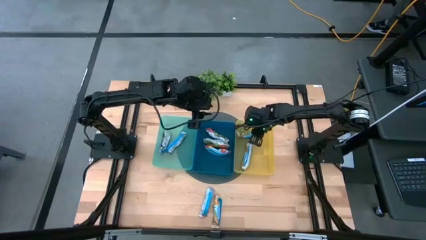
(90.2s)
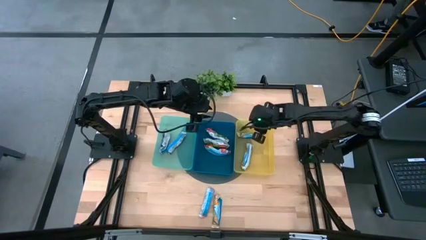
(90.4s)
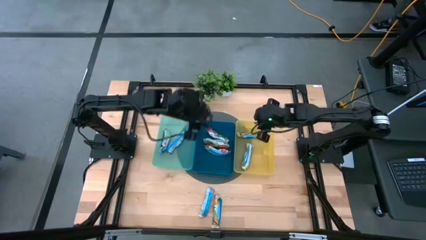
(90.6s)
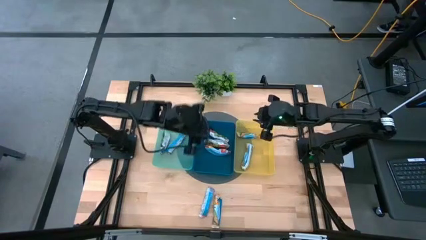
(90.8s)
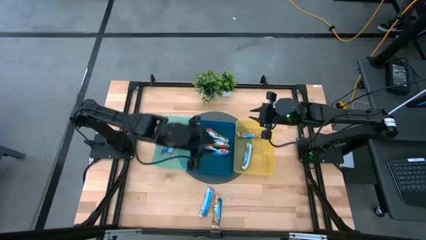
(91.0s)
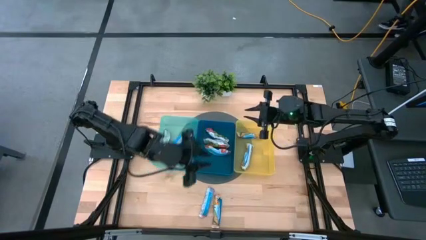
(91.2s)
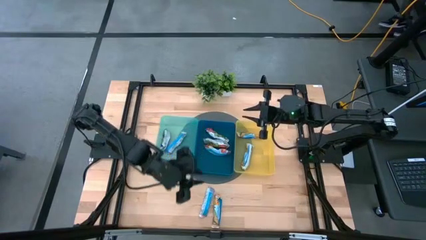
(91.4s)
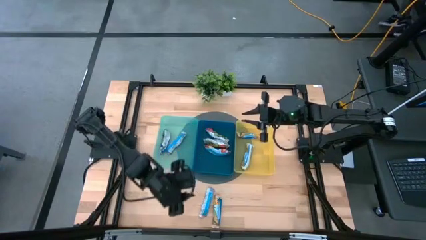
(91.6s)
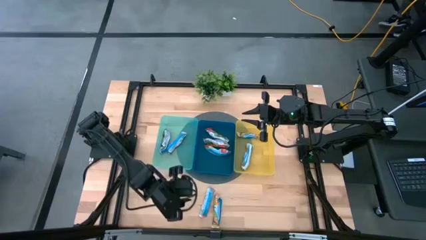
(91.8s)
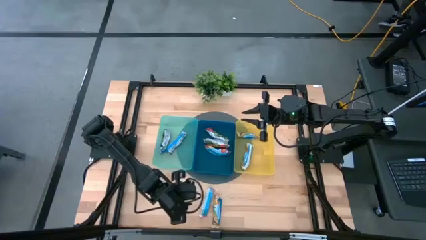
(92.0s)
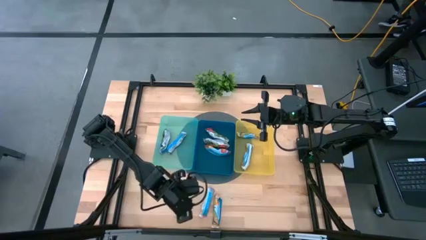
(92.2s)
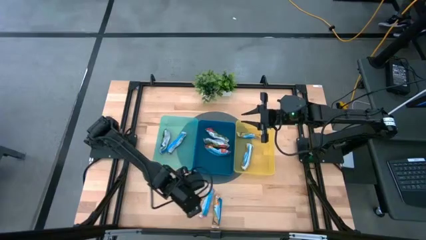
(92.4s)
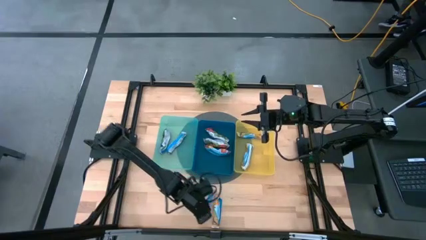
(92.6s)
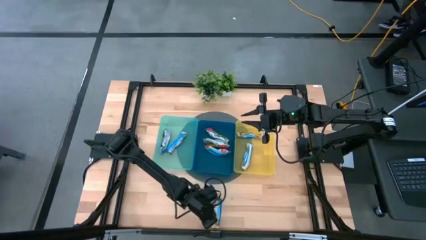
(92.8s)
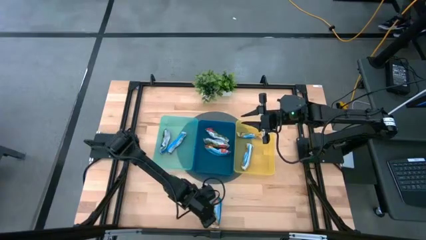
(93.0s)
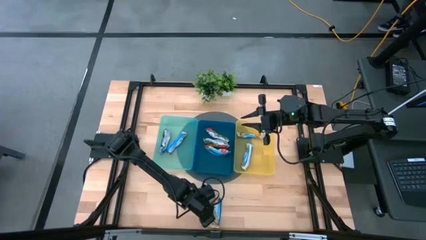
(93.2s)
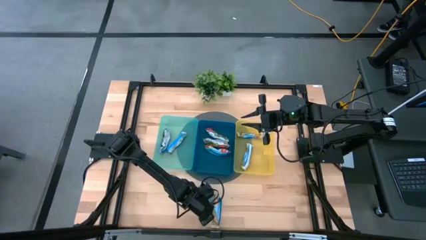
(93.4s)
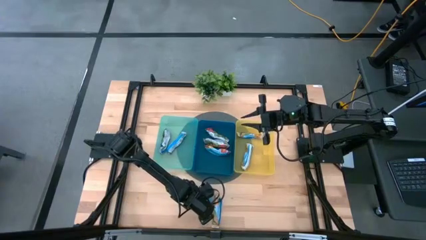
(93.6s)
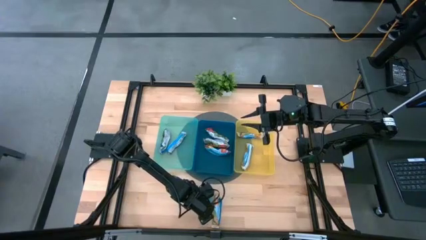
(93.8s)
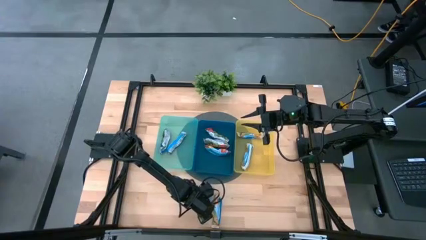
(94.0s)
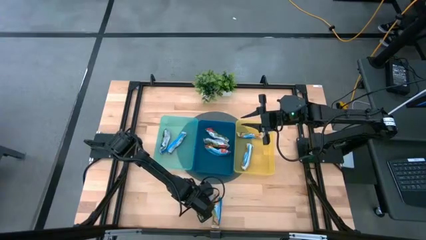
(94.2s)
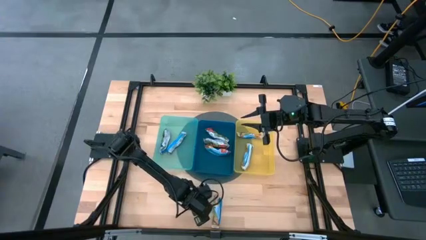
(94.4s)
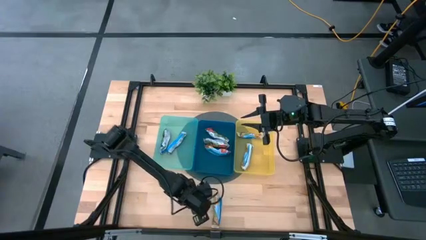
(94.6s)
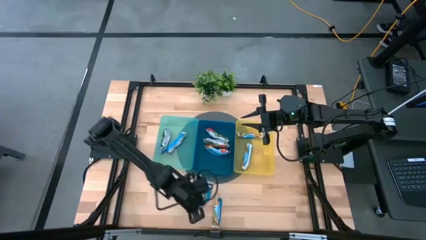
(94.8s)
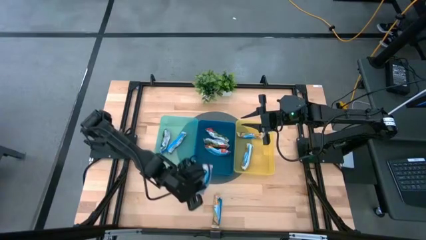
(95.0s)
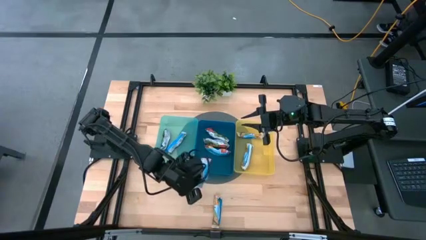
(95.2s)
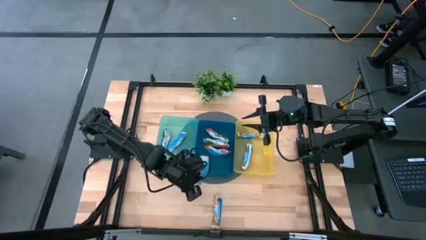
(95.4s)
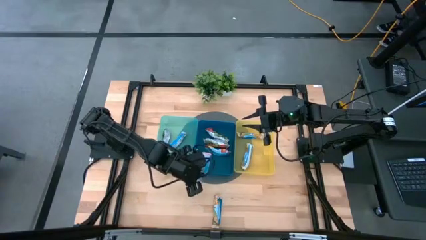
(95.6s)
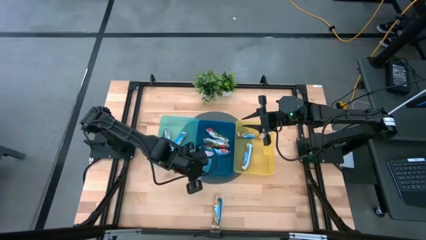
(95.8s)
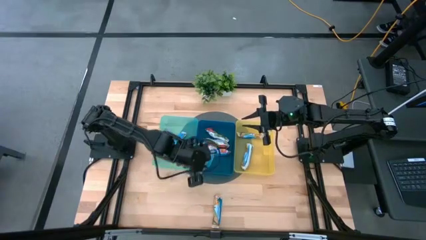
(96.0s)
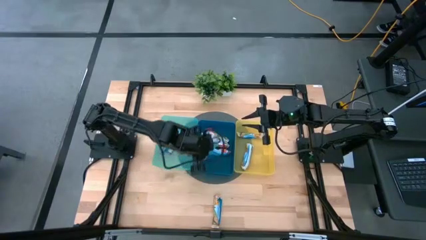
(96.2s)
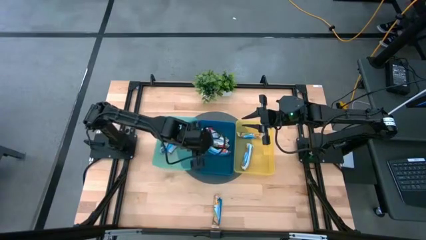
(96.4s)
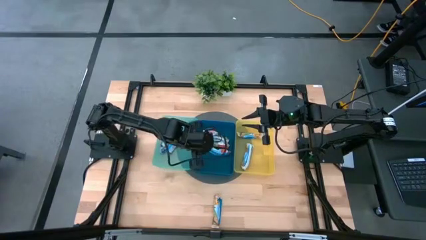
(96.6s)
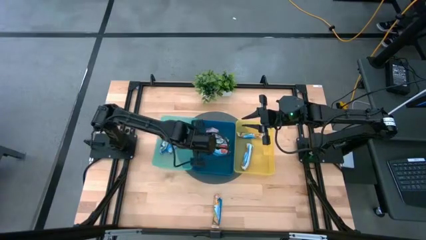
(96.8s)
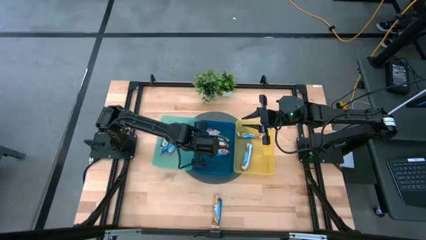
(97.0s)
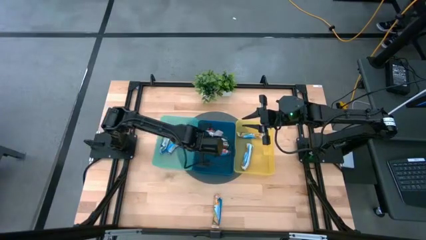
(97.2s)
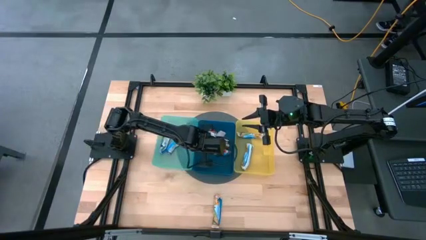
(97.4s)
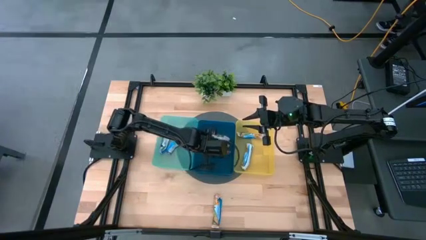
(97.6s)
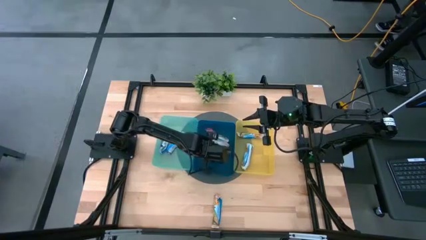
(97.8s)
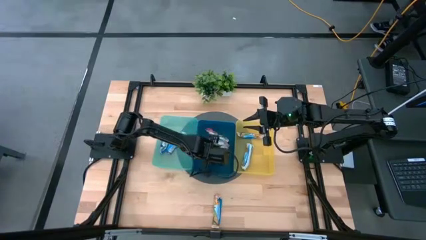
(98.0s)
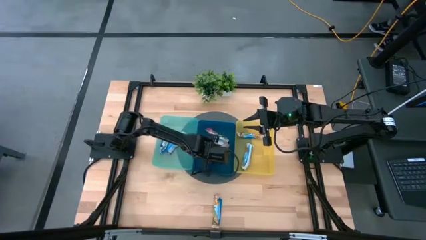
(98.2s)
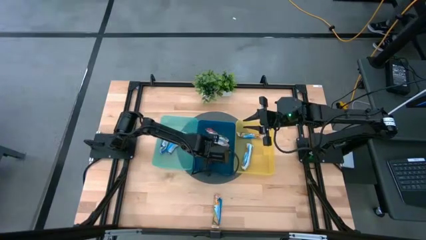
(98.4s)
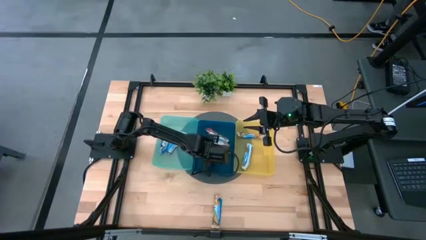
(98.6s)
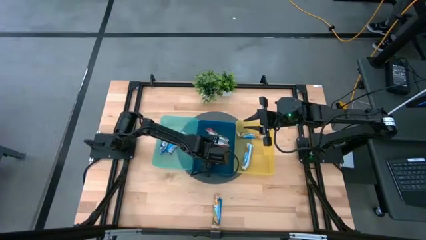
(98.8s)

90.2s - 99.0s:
Task: Pick and place Granola Bars by type
Put the red granola bar into the blue bin

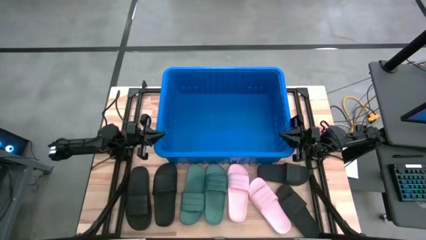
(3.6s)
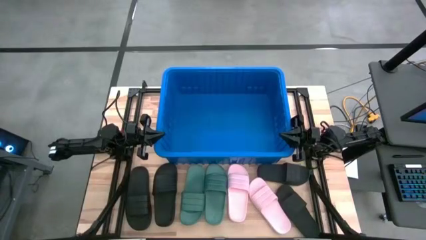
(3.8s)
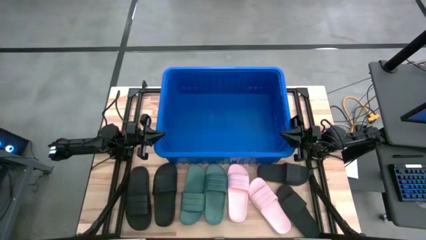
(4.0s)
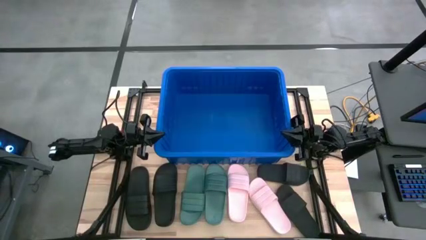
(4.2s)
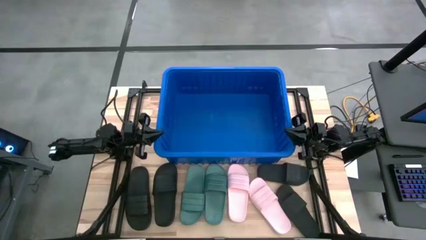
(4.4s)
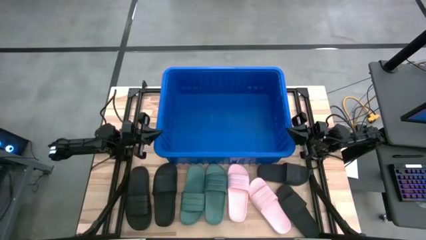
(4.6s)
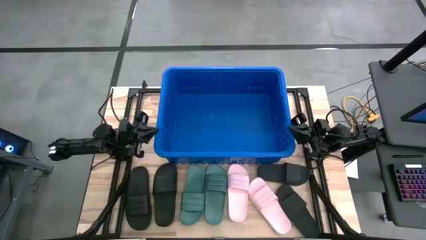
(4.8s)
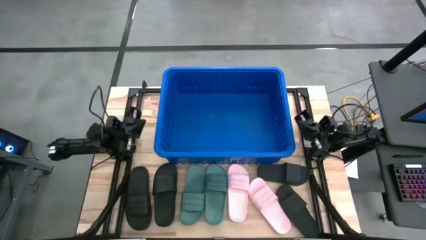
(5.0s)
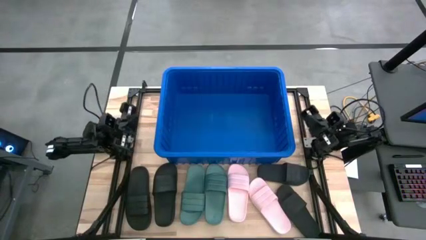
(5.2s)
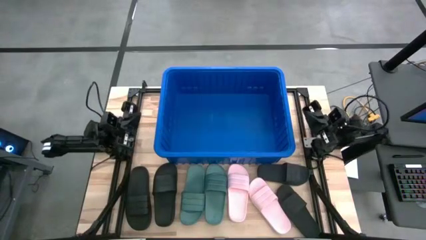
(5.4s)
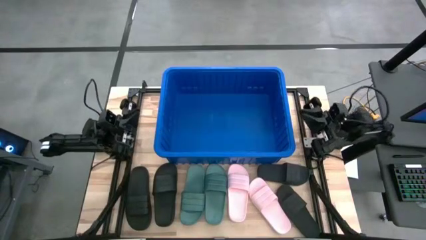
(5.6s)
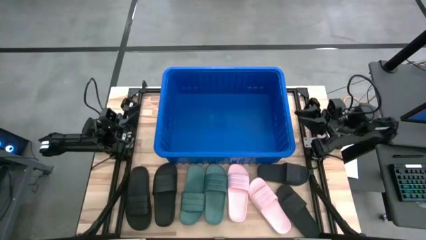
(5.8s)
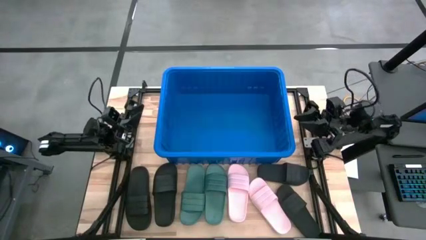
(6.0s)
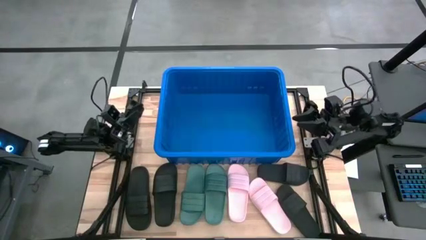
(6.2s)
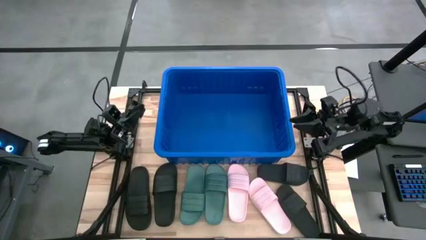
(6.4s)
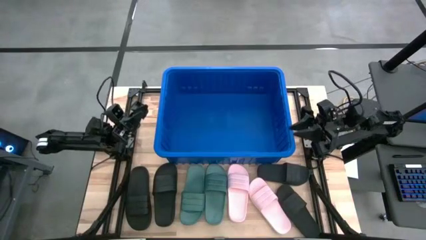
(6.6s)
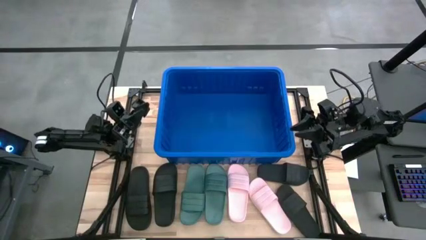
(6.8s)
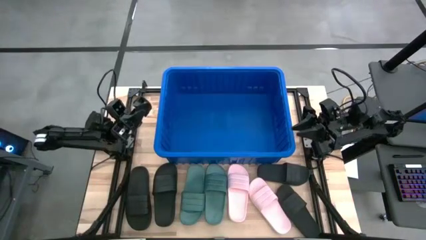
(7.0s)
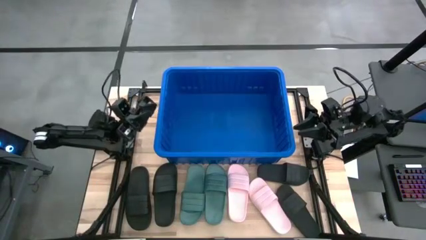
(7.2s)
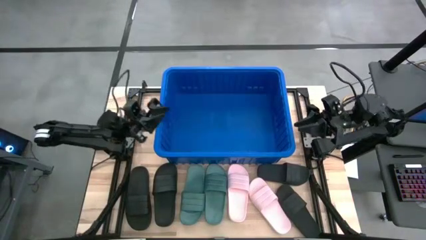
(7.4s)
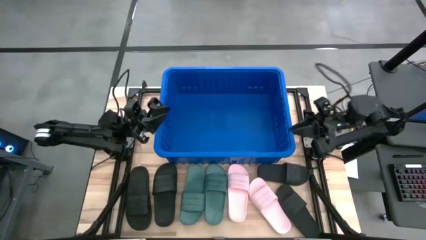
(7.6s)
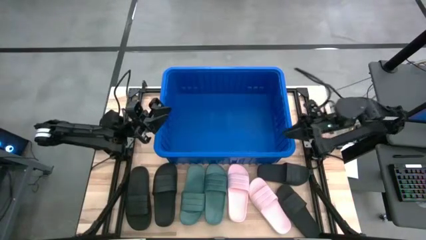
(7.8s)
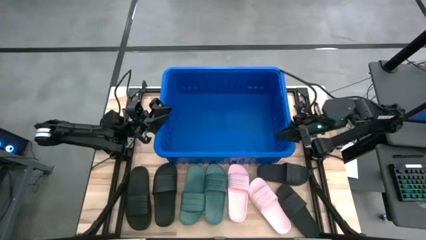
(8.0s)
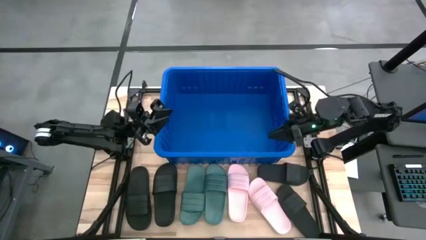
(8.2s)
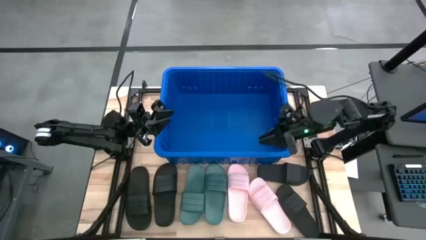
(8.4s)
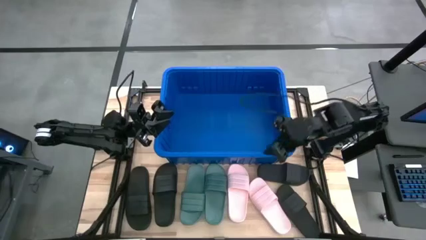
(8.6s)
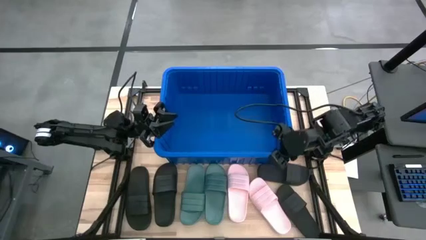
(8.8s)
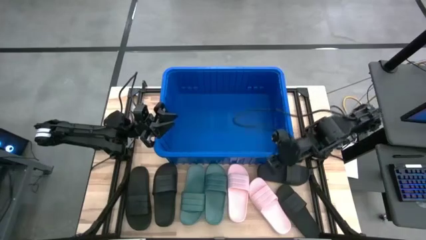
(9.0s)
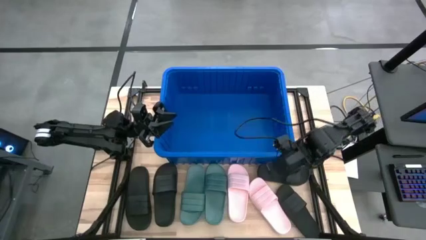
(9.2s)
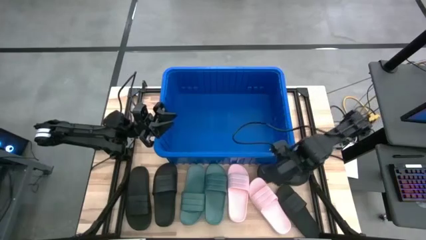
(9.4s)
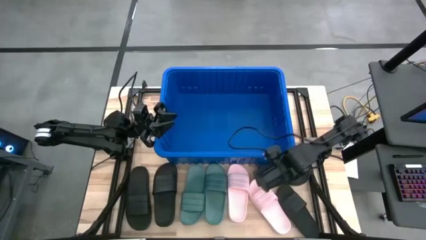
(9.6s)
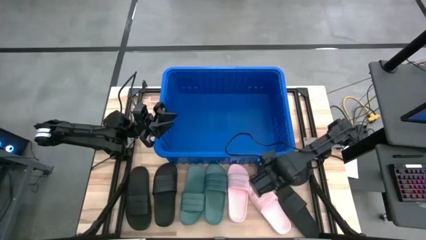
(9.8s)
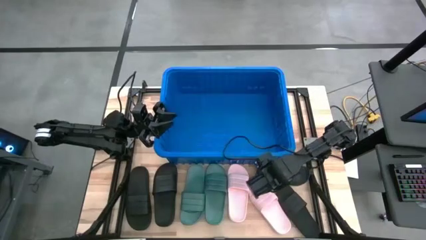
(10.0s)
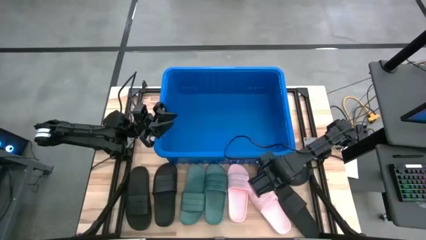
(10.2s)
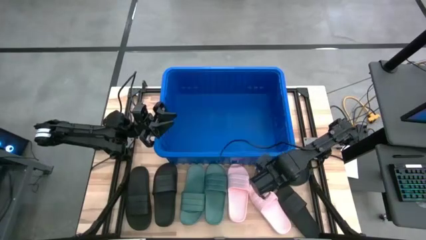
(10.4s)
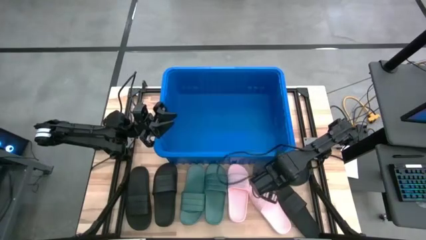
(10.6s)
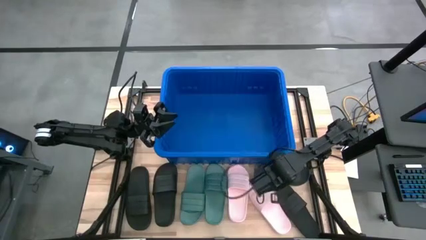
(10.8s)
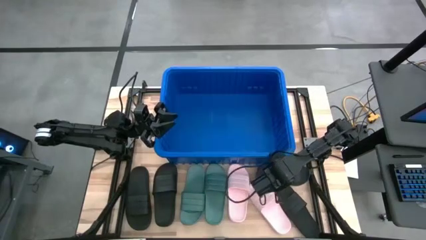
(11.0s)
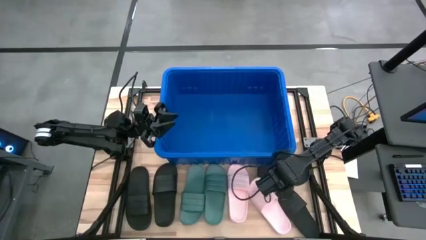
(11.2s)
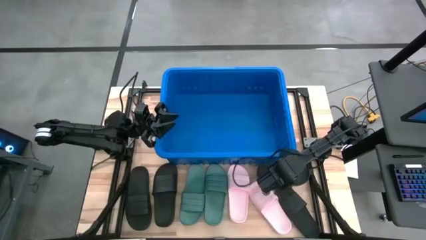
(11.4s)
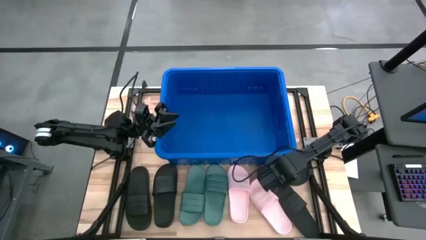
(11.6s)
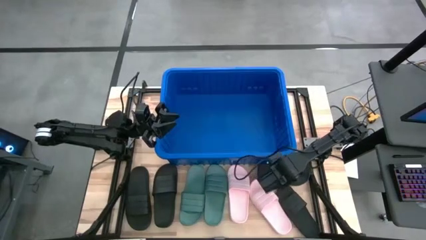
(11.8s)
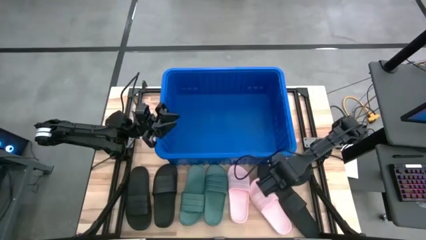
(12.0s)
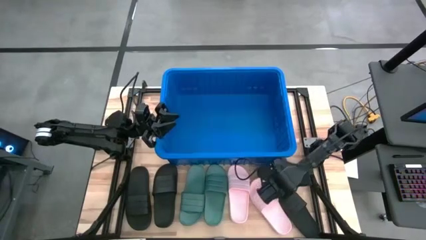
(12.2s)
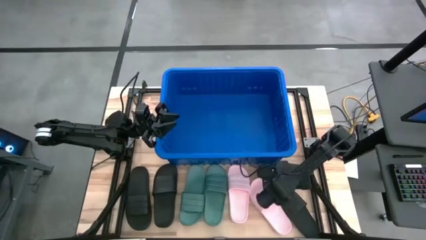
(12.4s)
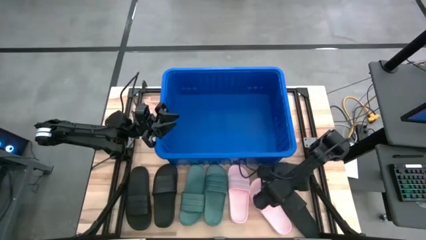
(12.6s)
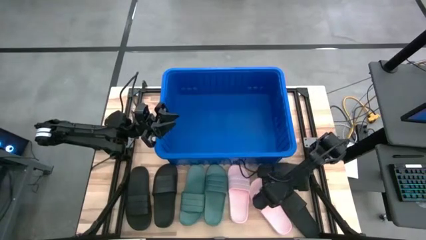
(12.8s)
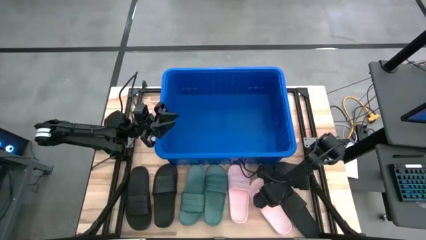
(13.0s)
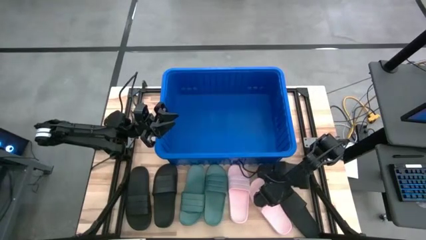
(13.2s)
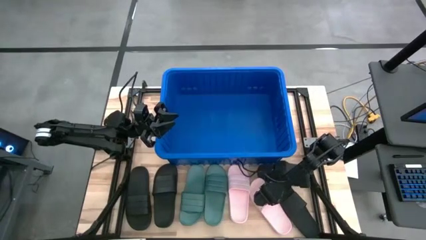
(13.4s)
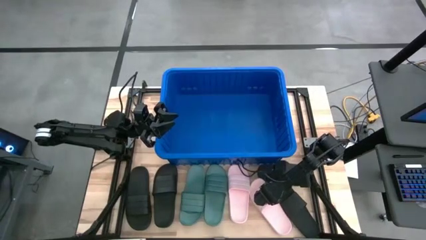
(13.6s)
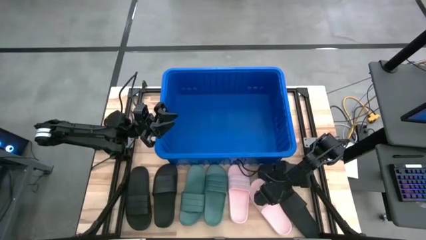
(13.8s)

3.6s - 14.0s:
Task: Pick and place slides into bin
Put the black slipper into the blue bin
